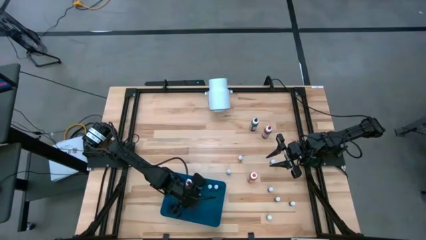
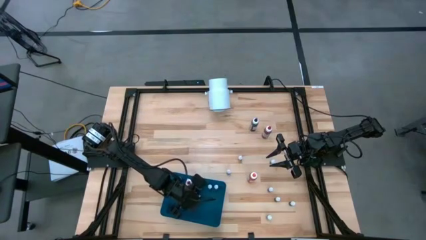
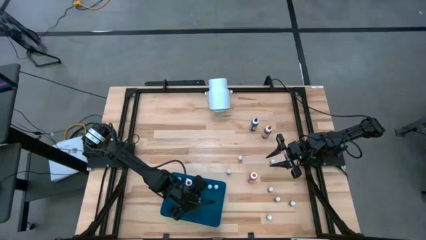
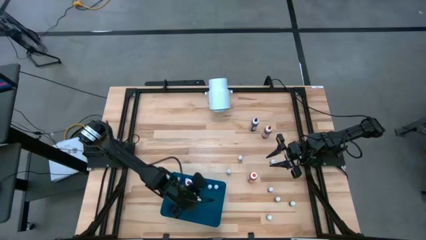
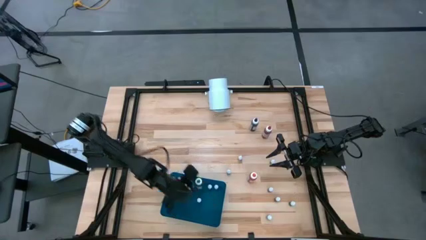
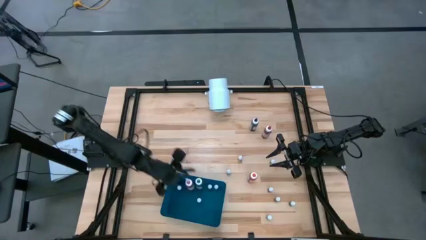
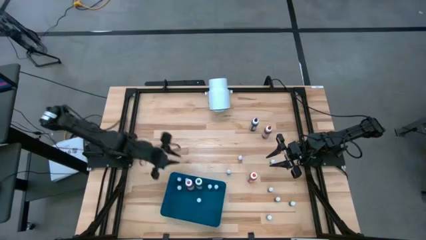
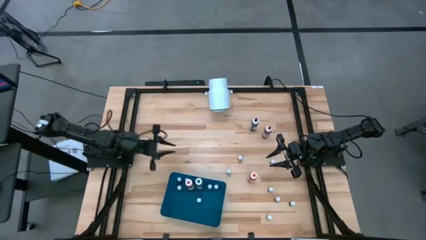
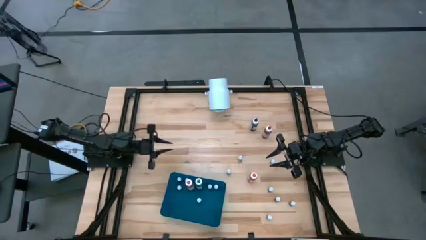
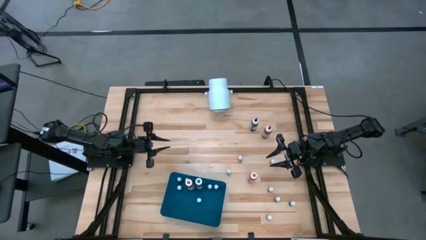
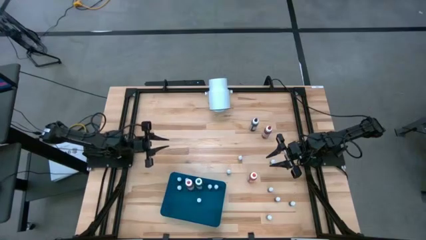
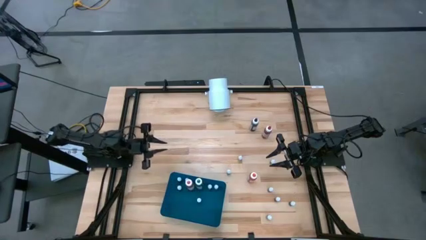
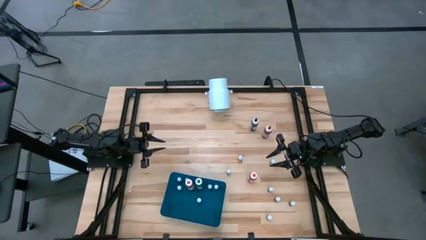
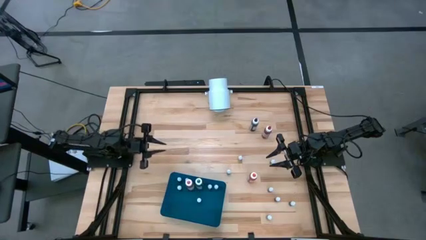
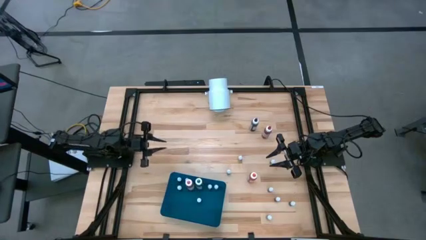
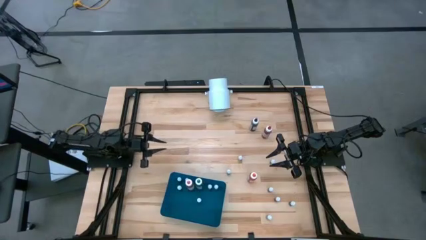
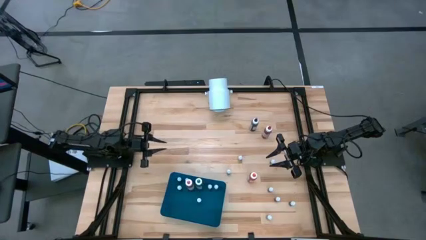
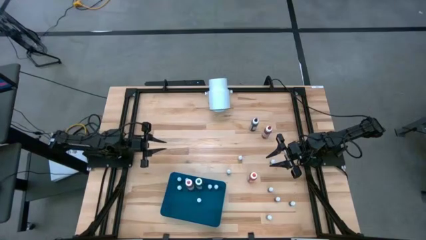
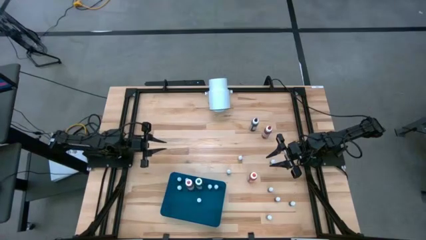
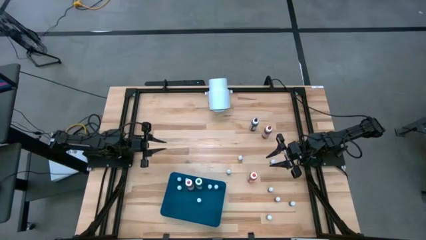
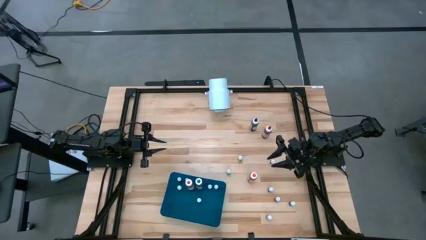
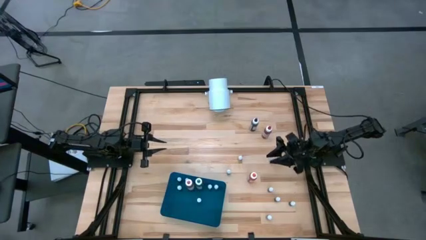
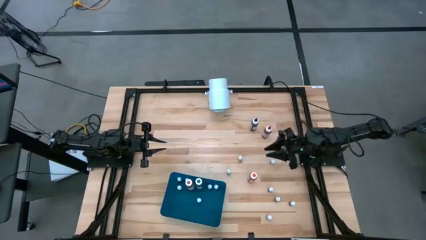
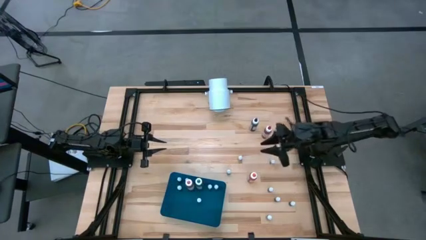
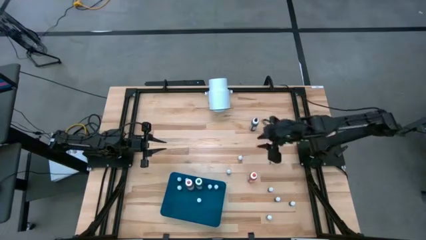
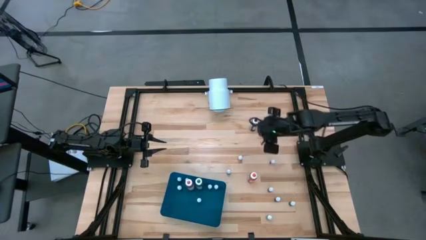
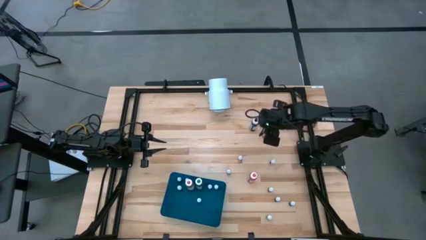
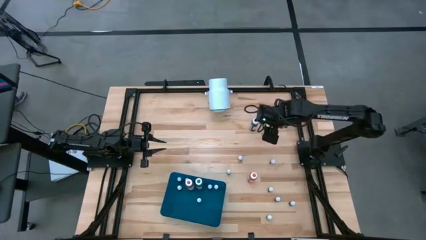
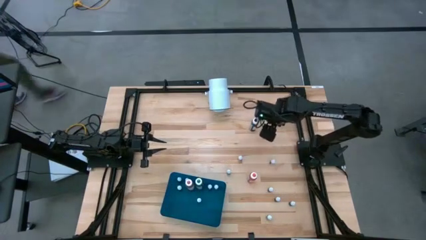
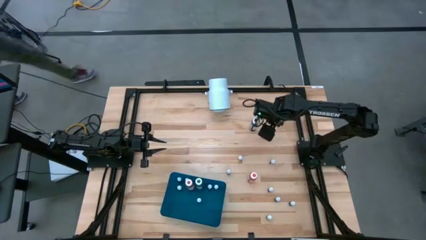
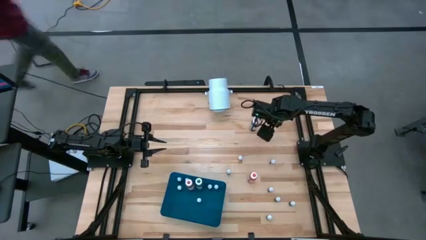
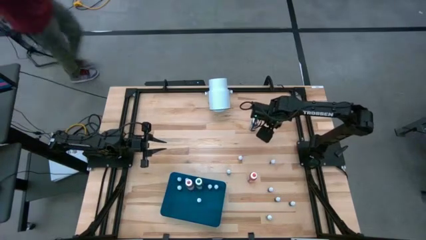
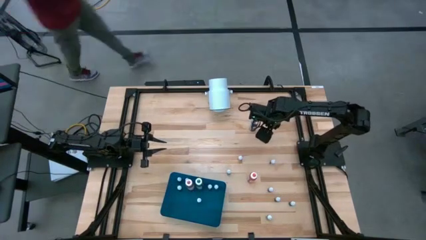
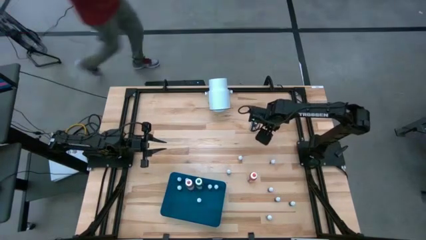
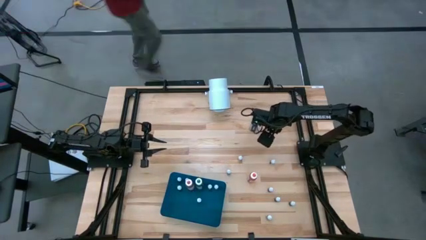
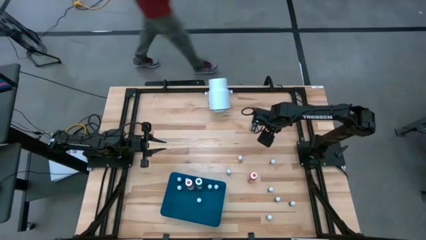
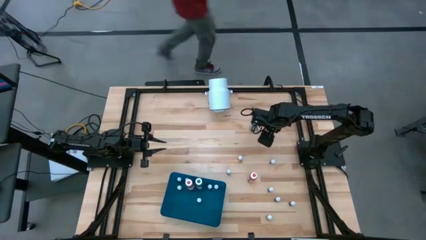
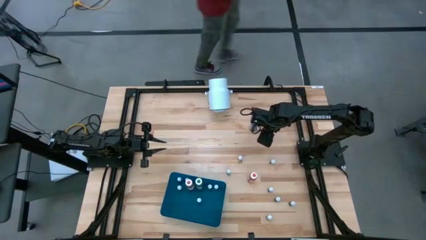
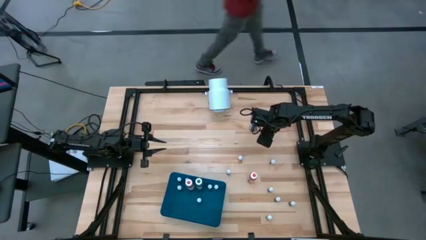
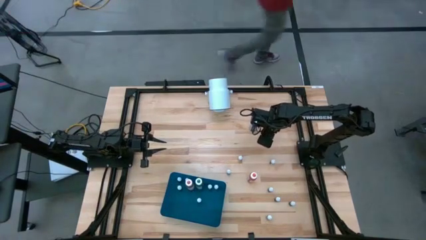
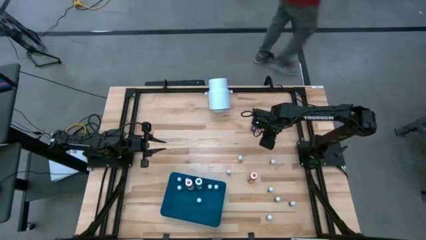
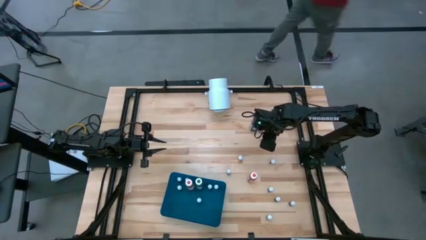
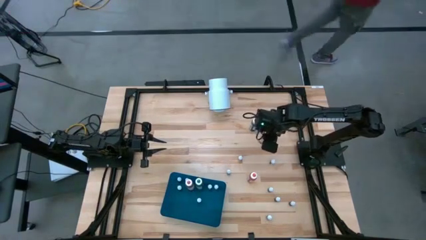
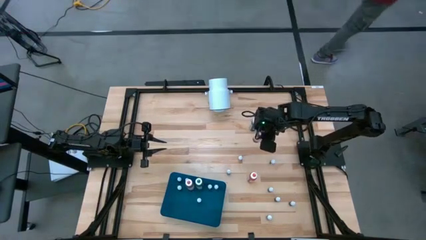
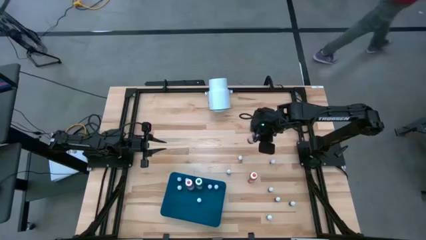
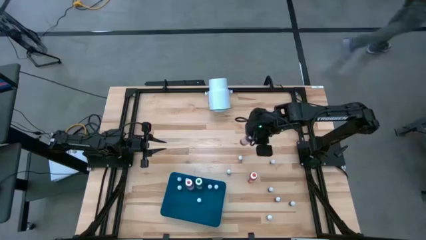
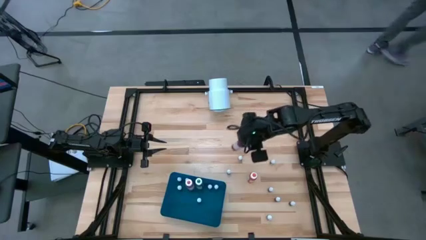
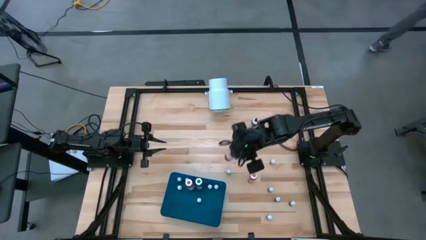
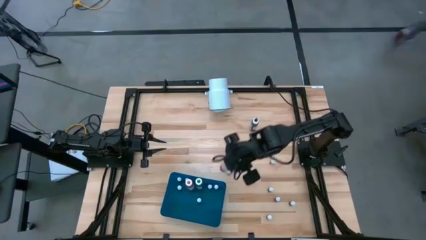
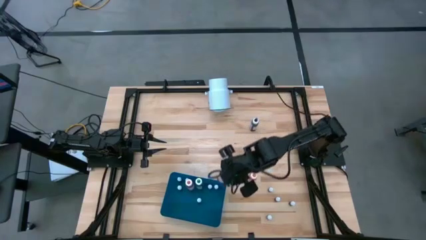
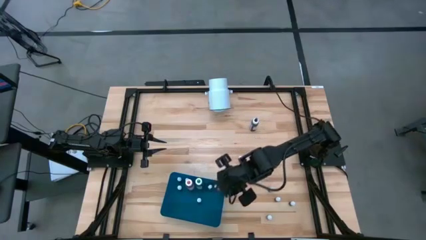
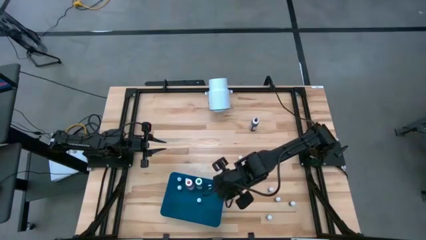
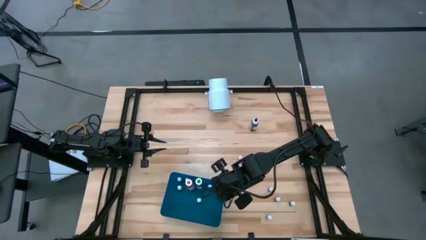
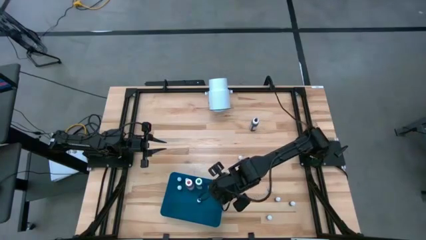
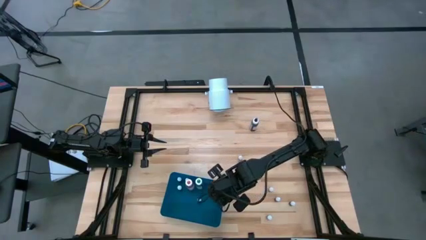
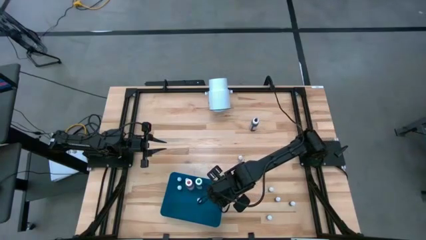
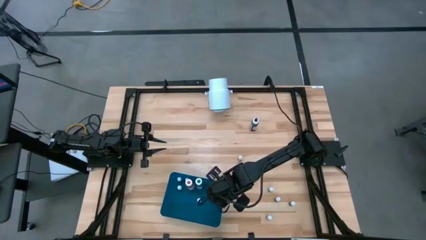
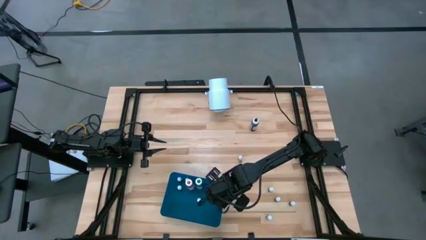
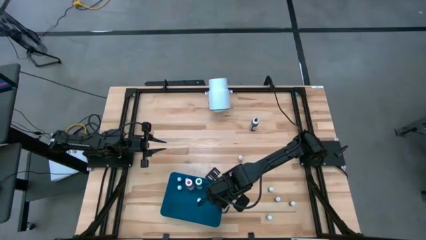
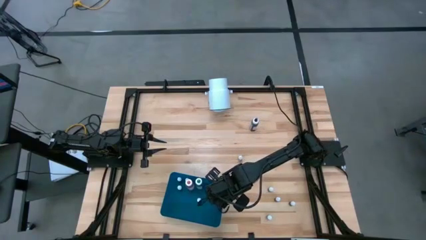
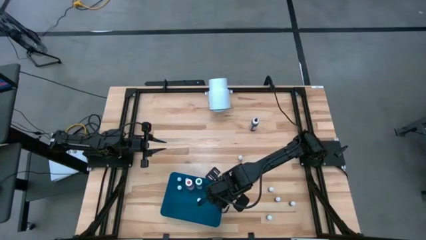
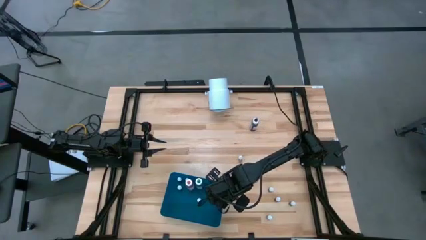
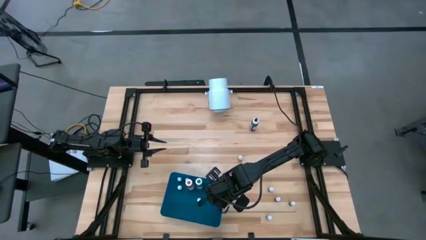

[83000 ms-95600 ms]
Task: Pick & Place food coloring
Put the large red food coloring bottle into the blue bin
